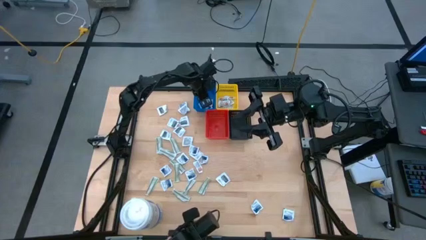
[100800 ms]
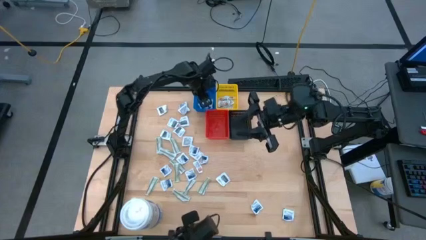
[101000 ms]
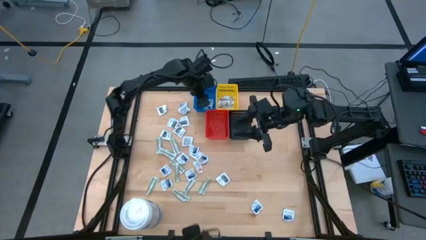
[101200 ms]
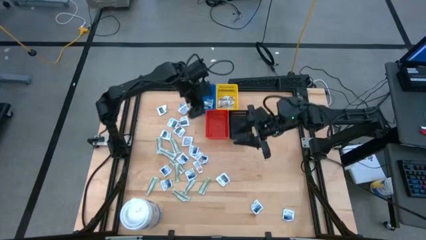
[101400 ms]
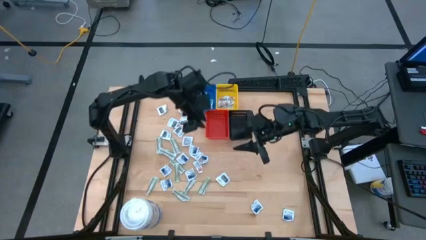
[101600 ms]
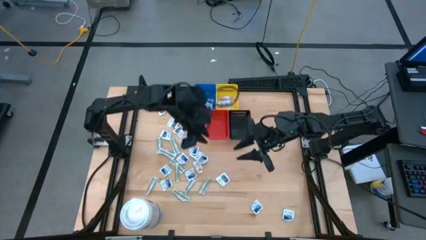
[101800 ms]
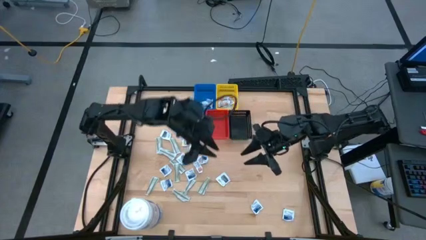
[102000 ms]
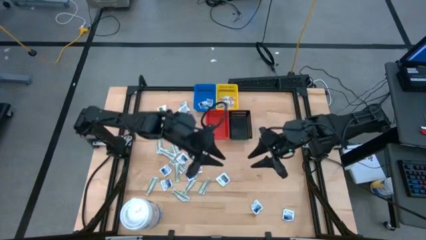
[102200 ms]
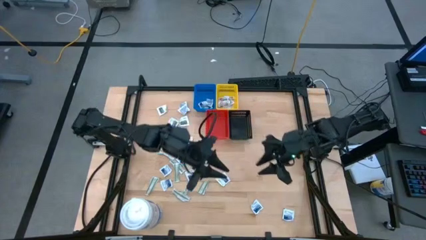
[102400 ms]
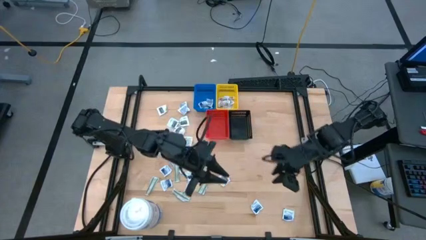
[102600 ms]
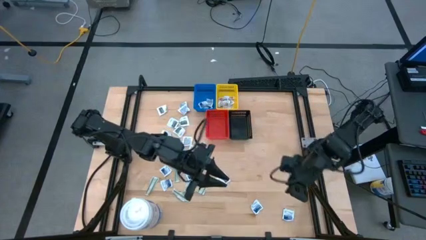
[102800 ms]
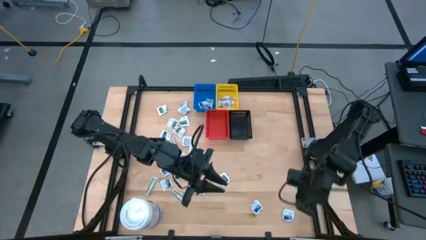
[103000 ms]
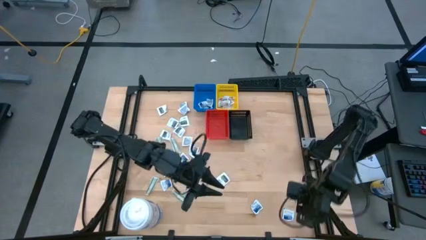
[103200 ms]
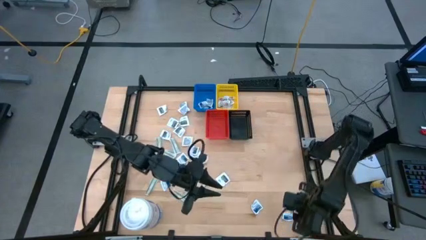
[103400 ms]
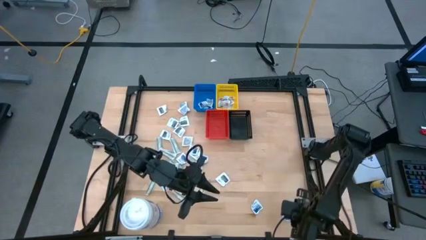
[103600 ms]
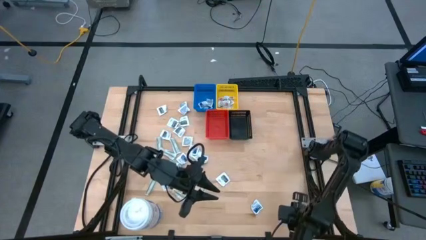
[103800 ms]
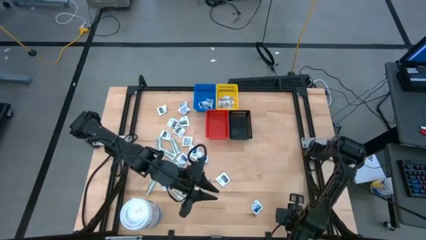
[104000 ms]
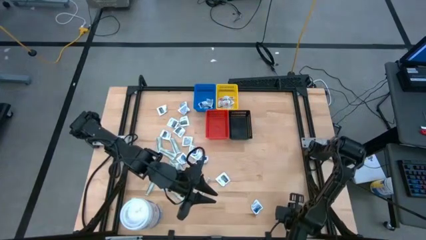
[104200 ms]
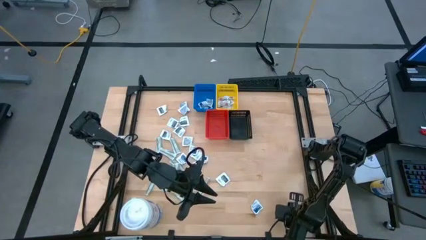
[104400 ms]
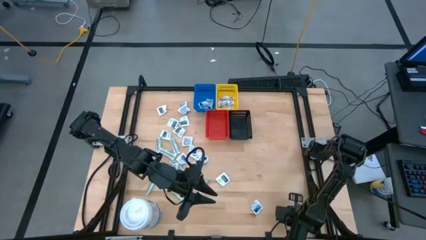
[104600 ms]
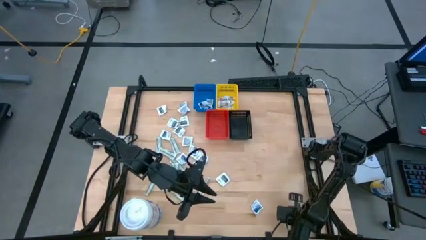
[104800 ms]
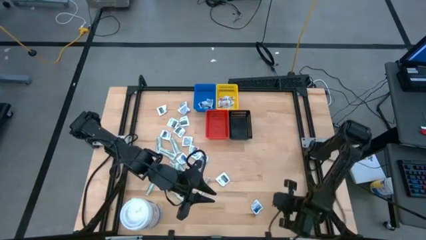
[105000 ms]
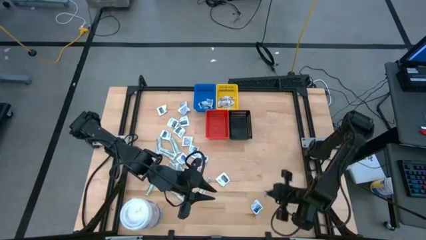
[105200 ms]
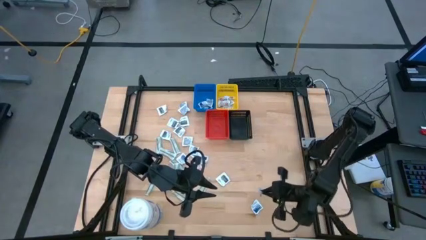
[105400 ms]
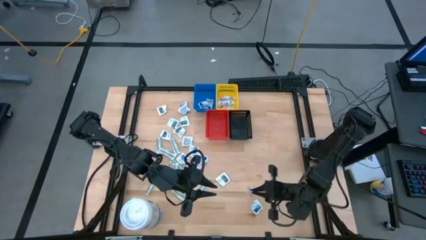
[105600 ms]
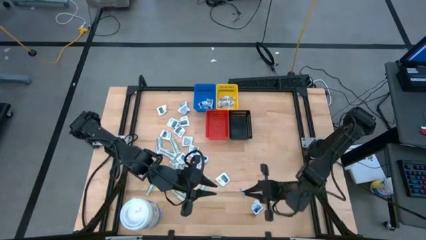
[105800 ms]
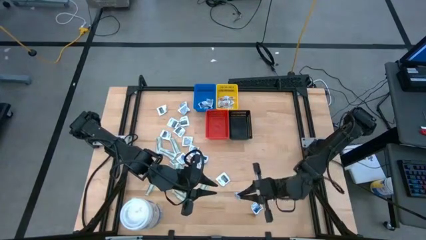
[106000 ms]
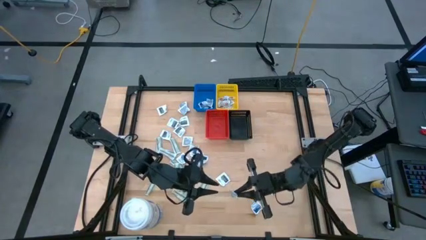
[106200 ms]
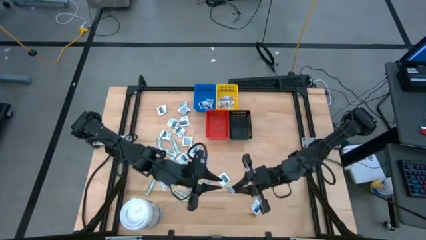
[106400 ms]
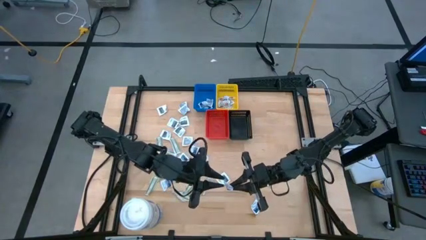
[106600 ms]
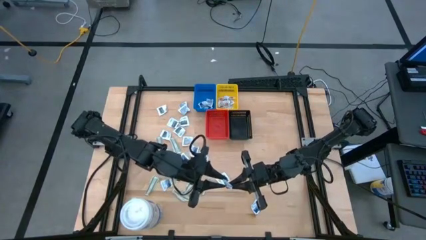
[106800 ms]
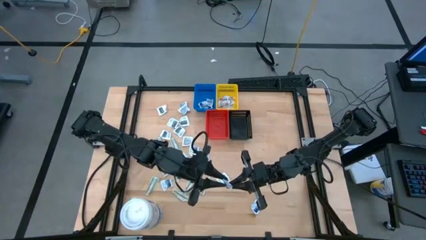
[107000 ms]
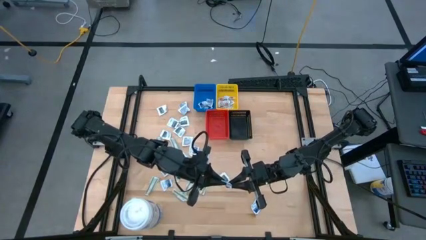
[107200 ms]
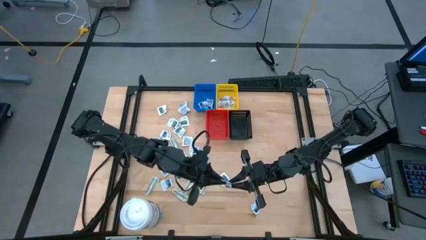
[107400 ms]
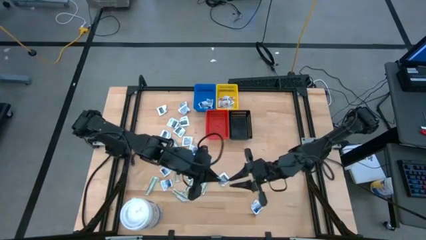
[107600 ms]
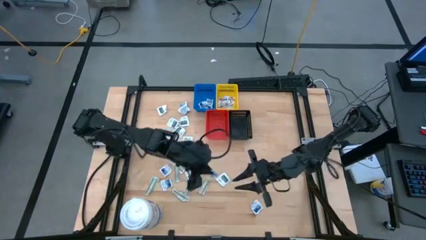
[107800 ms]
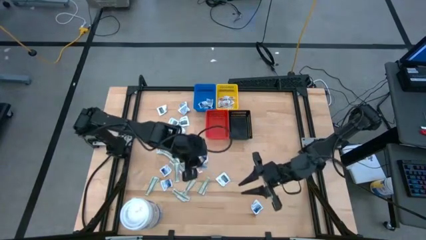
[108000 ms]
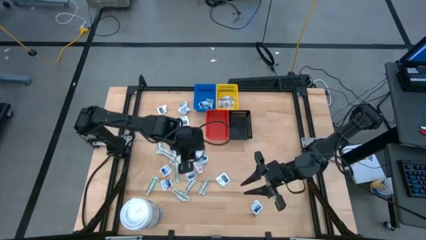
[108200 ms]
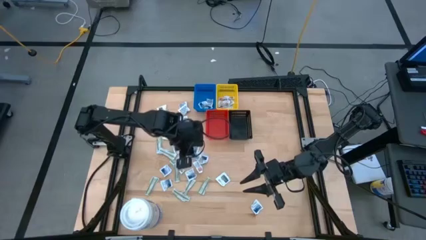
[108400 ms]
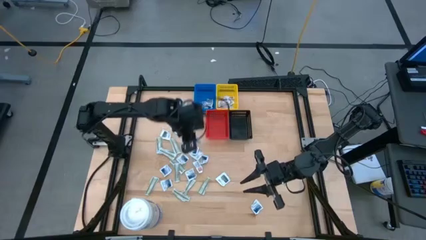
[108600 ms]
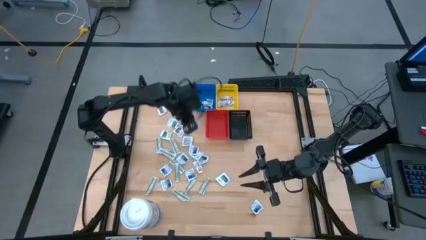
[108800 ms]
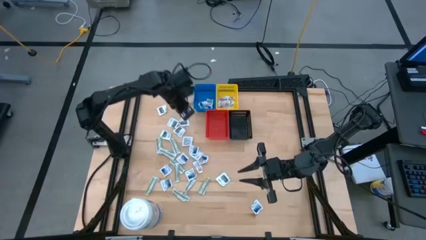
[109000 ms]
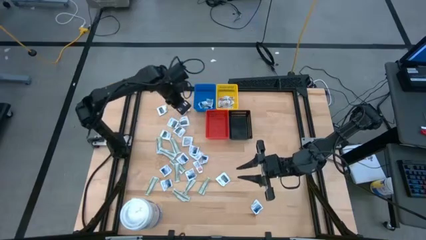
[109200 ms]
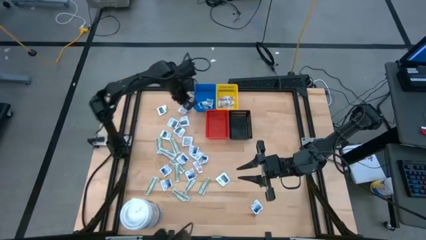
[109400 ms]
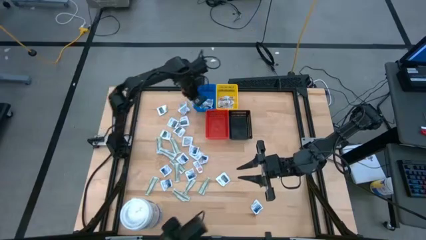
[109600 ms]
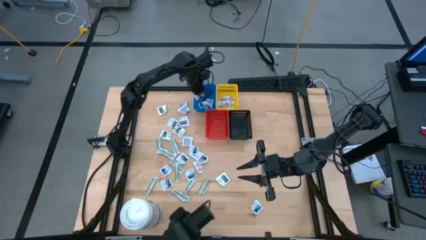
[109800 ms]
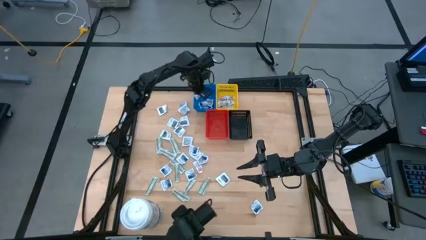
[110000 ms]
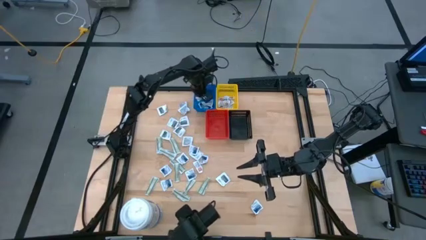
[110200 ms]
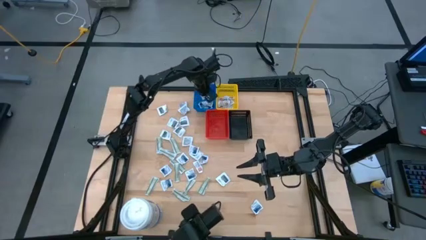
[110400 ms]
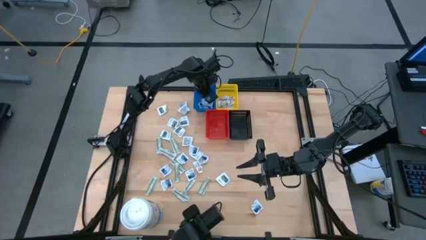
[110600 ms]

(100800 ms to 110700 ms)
Task: Pick & Place First Aid Supplies
Put the alcohol pad into the blue bin

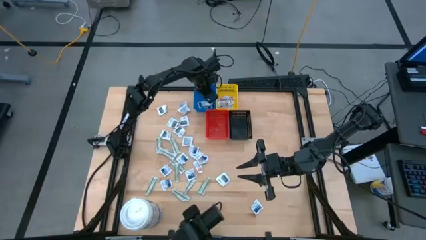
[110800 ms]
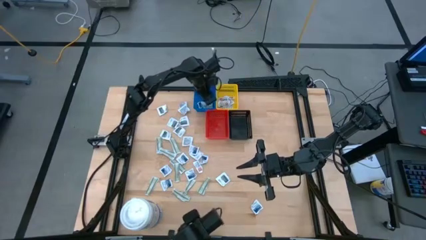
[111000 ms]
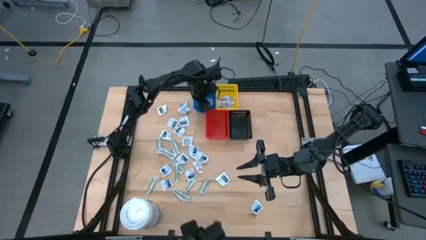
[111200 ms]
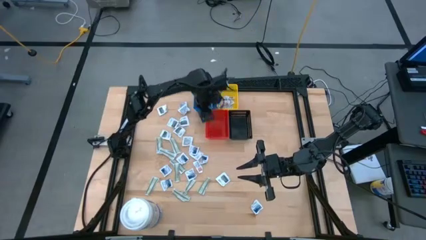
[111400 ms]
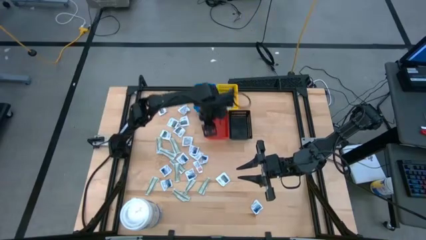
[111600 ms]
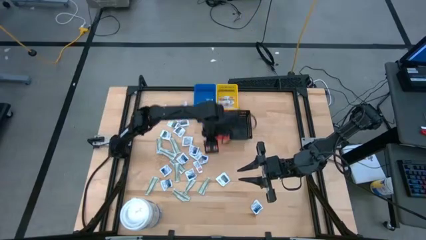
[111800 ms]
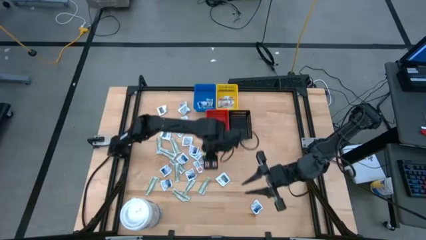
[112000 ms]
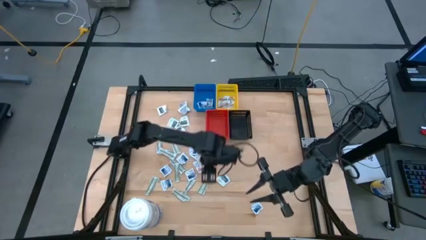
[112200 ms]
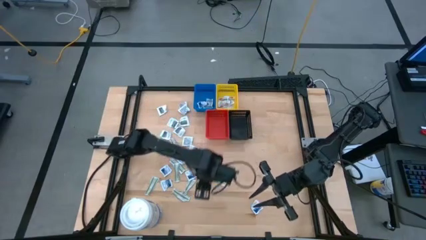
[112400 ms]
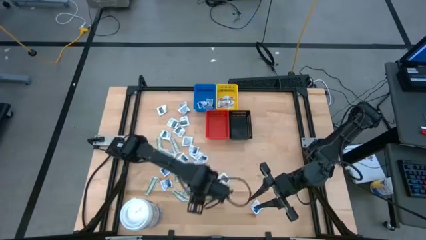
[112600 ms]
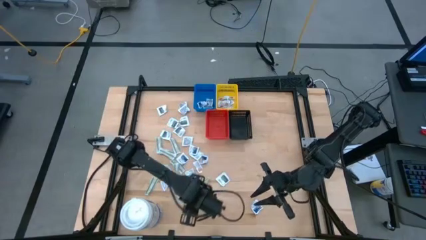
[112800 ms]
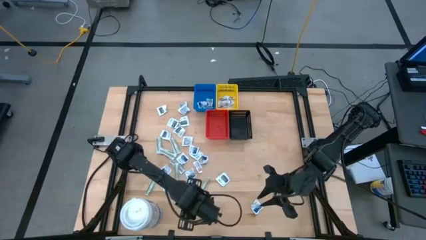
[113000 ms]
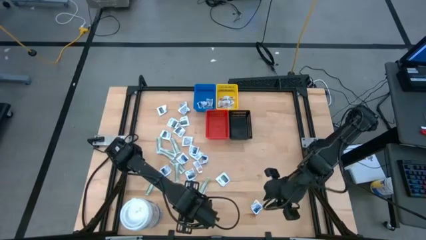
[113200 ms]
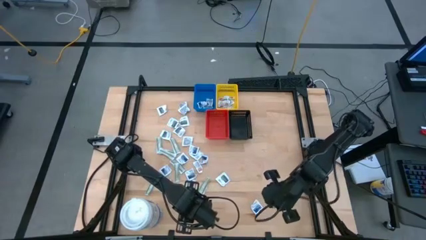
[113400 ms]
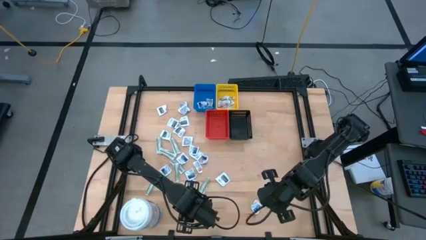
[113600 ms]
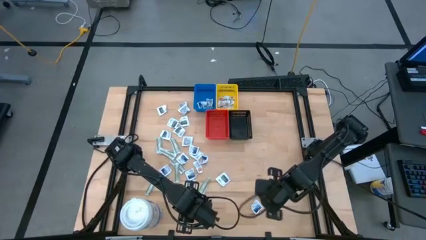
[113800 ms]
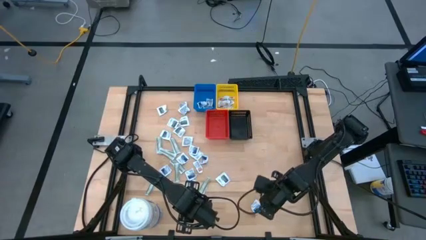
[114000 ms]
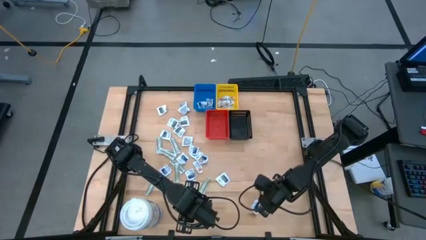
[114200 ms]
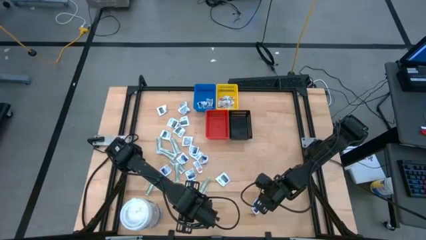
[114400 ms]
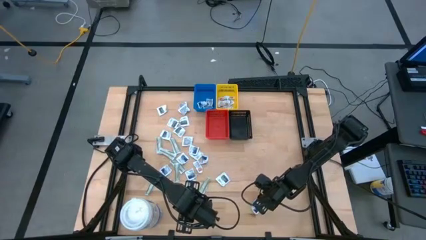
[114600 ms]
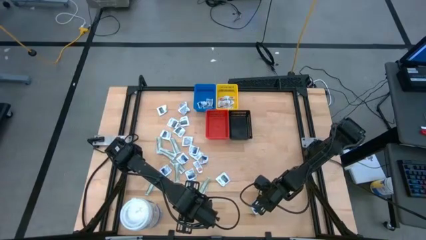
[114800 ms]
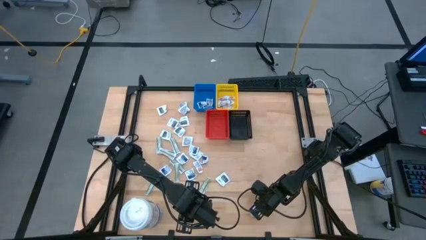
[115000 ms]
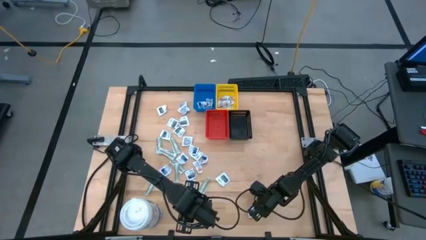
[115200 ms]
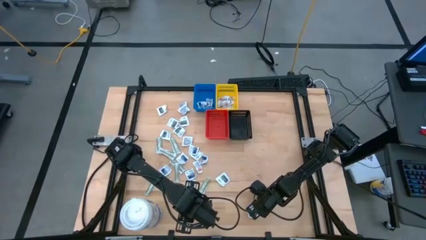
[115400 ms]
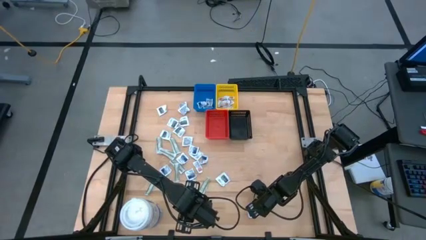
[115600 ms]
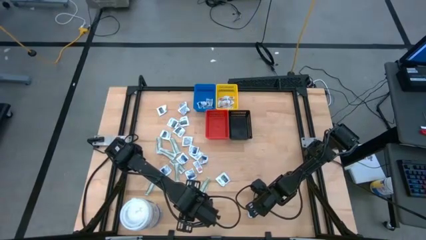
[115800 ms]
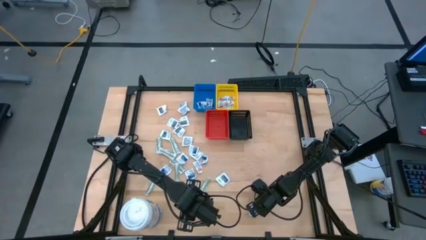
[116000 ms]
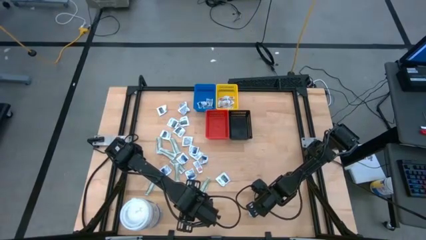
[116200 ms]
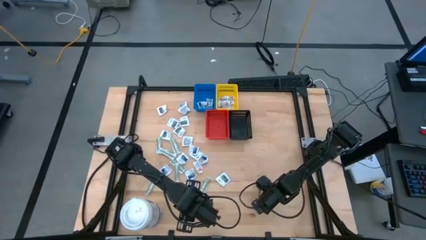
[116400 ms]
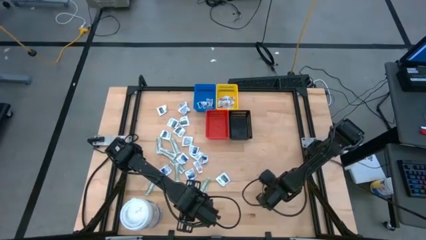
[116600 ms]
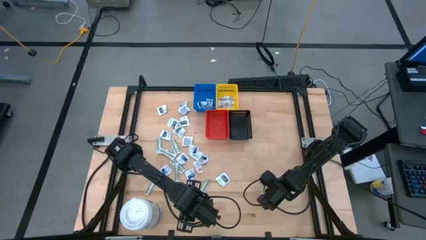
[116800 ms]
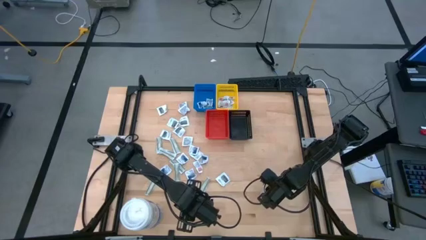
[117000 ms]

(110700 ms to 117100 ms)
Put the alcohol pad into the blue bin
